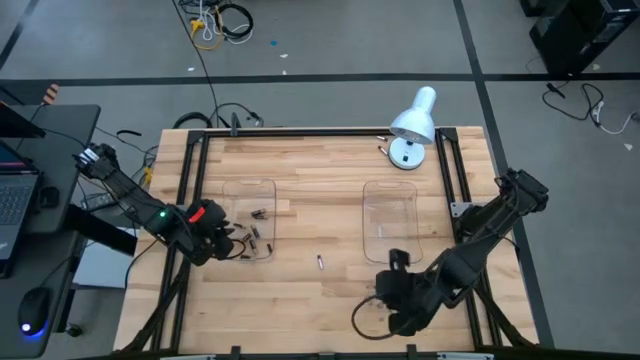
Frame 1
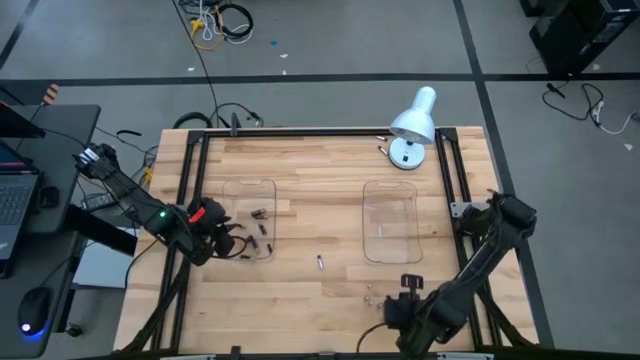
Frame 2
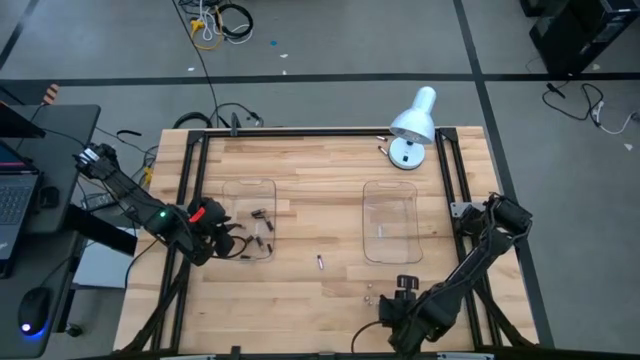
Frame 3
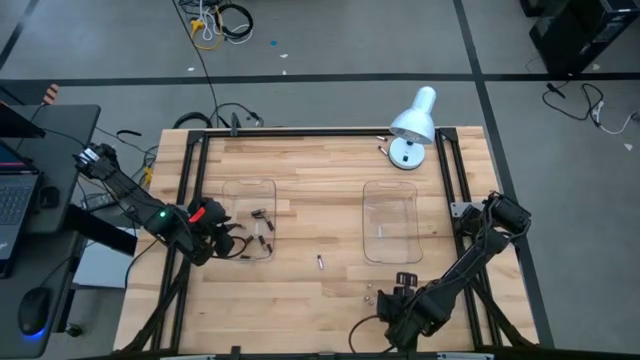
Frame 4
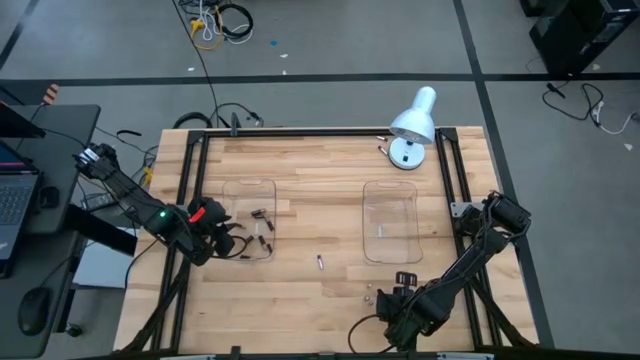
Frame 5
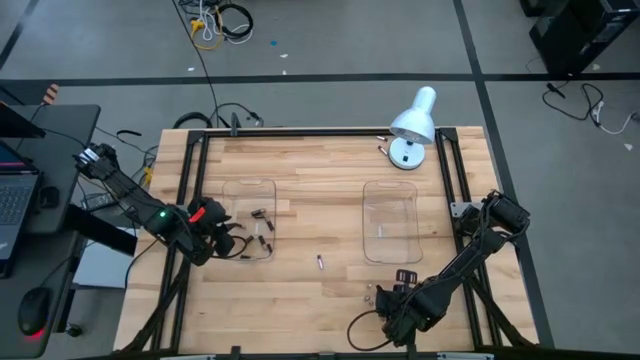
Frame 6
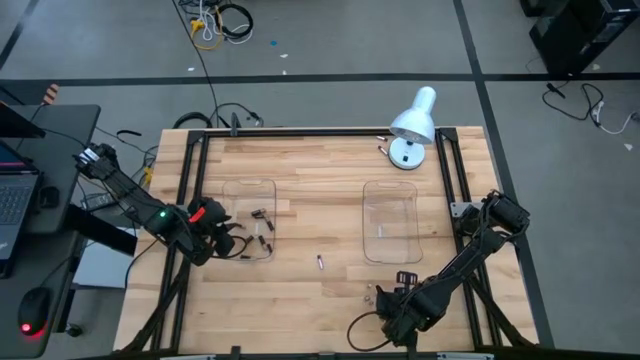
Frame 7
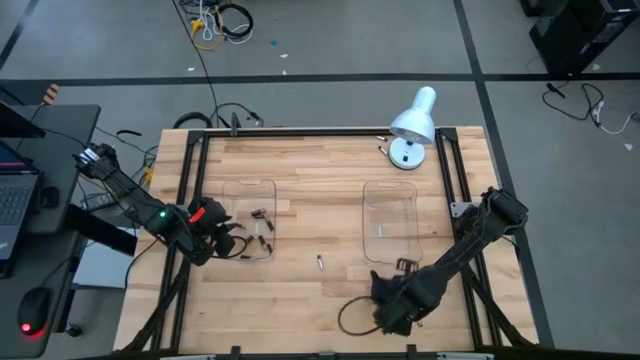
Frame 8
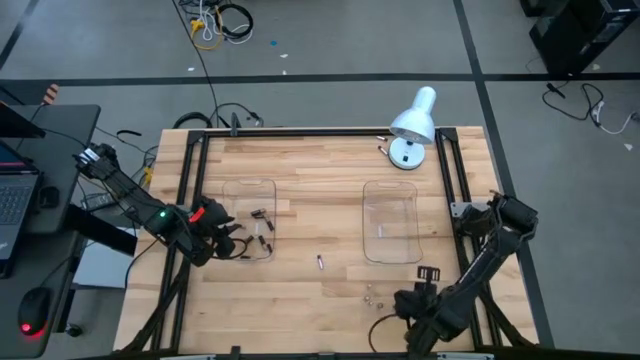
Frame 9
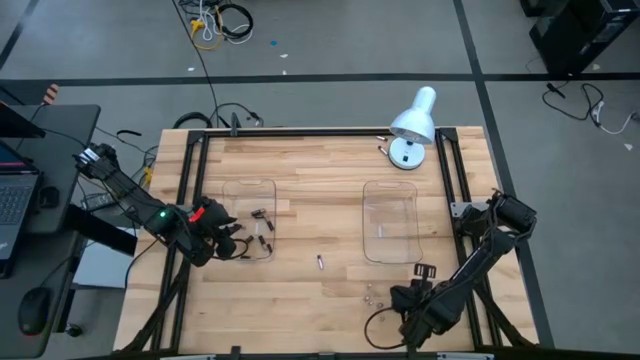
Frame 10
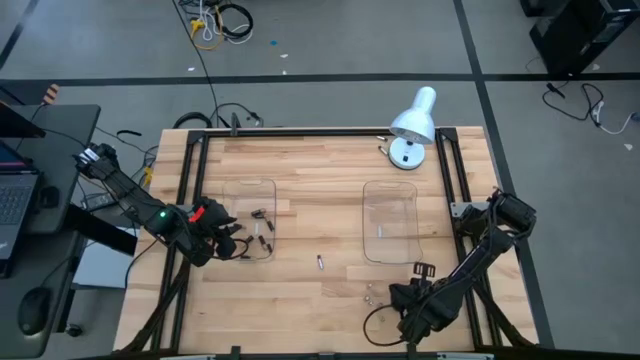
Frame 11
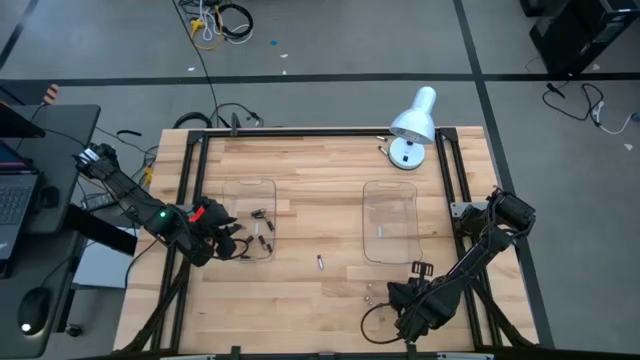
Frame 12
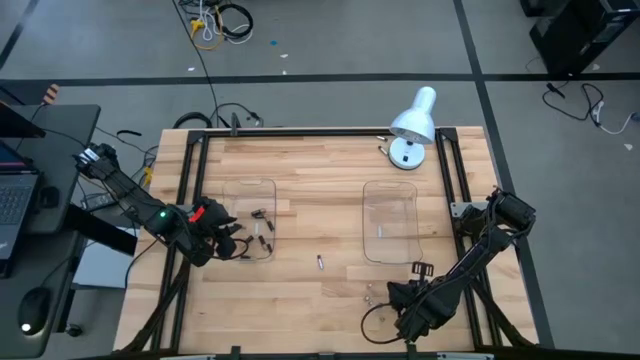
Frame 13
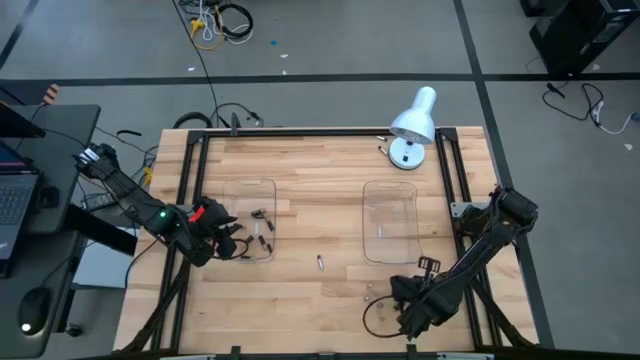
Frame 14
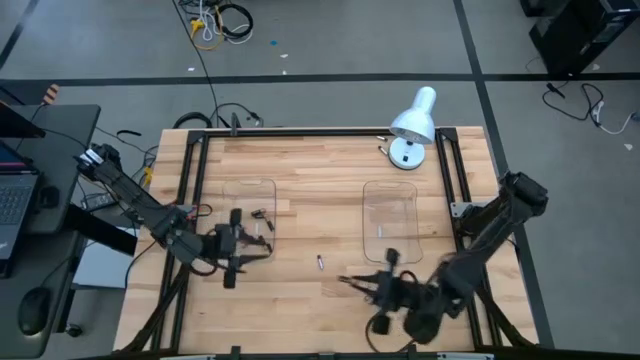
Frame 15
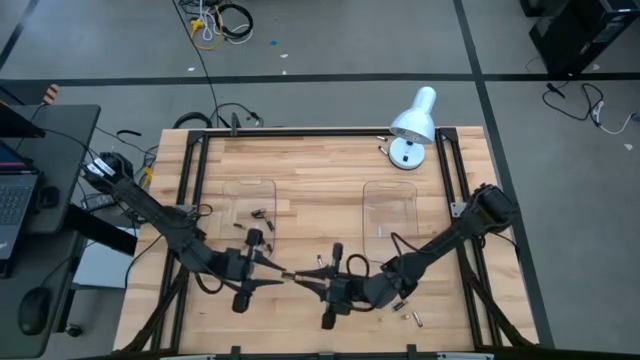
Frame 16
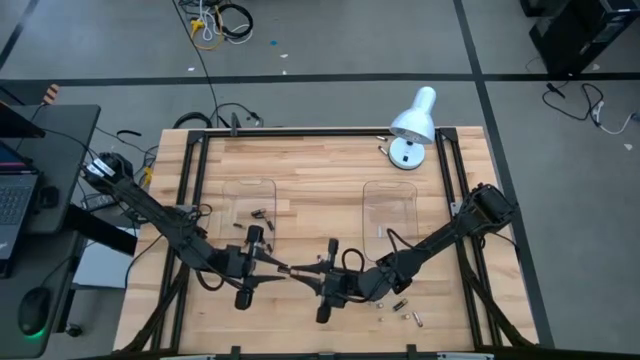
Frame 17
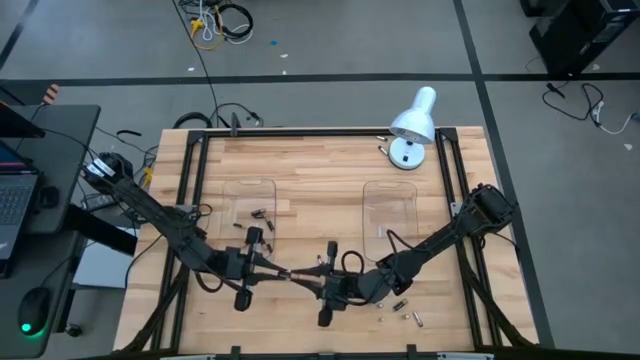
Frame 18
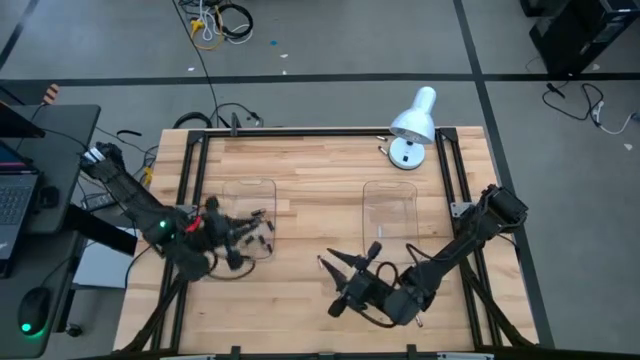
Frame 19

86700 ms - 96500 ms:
Task: Sort batteries
Put the black battery into the left transparent bin

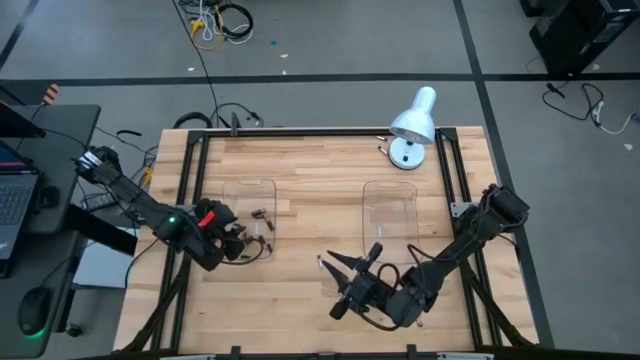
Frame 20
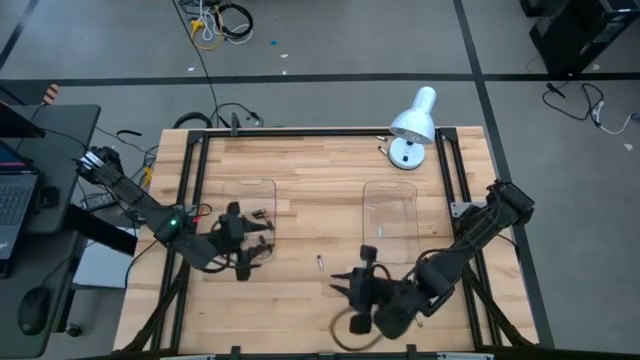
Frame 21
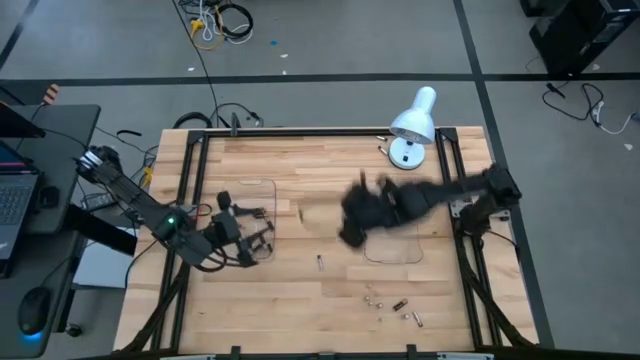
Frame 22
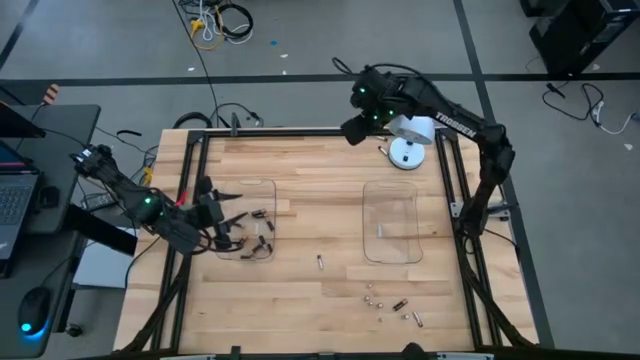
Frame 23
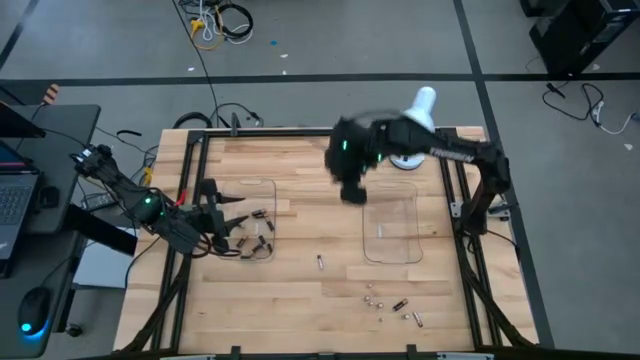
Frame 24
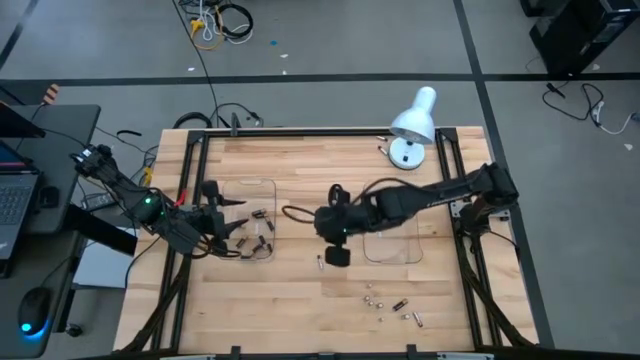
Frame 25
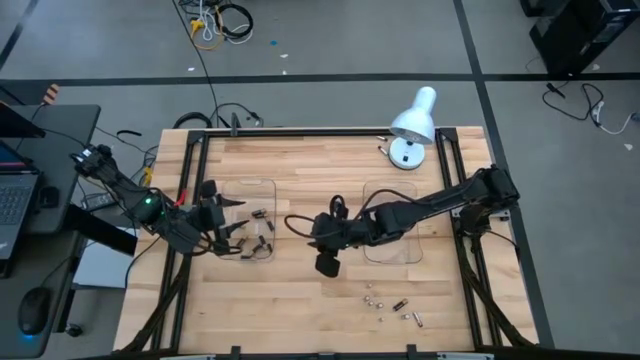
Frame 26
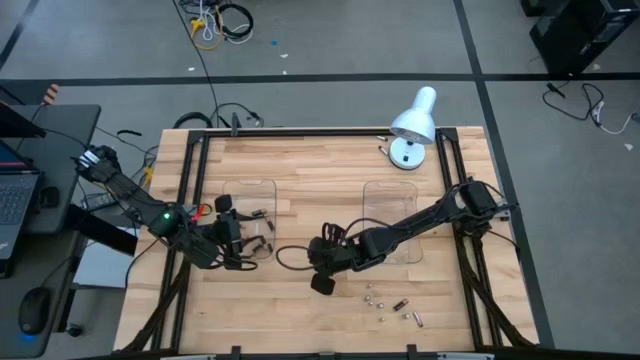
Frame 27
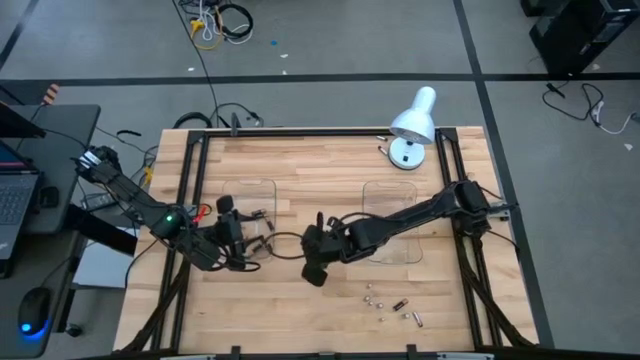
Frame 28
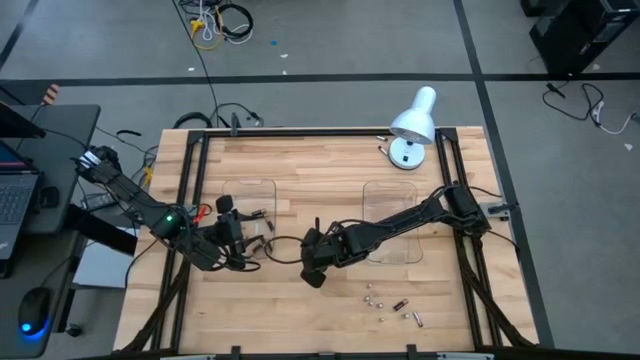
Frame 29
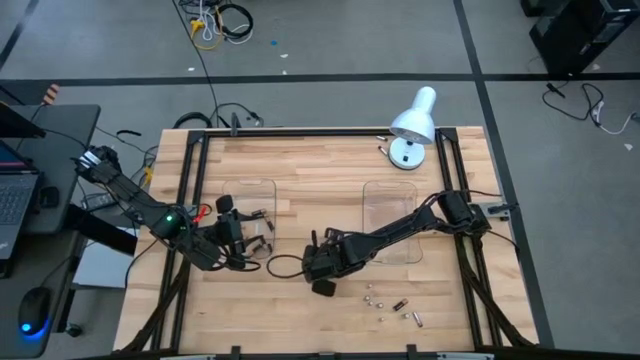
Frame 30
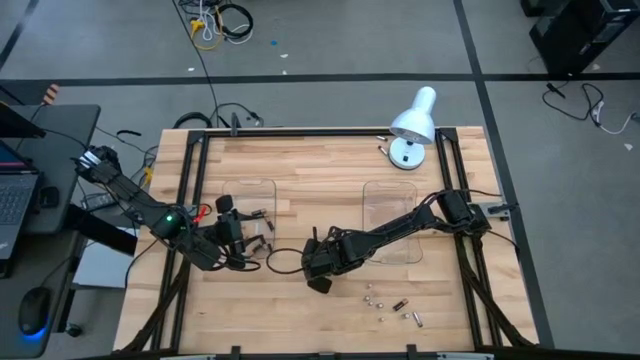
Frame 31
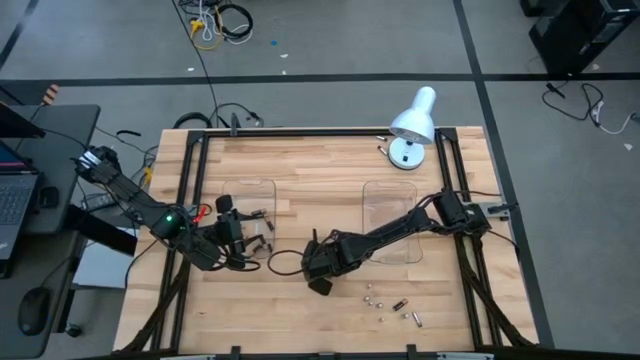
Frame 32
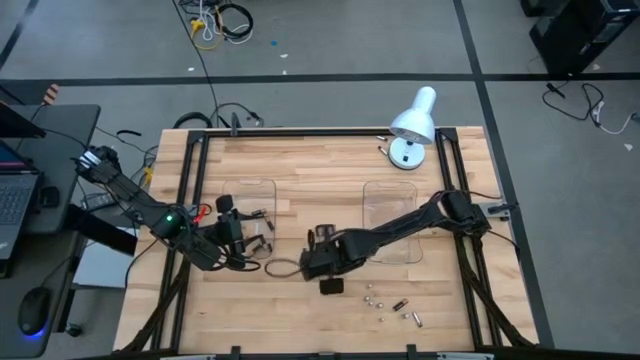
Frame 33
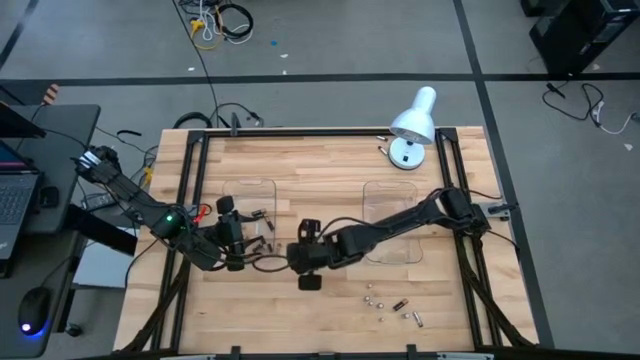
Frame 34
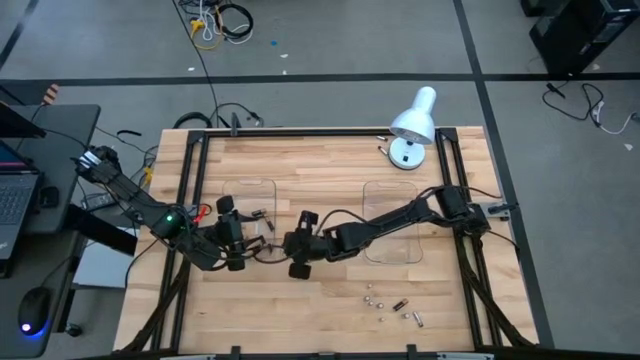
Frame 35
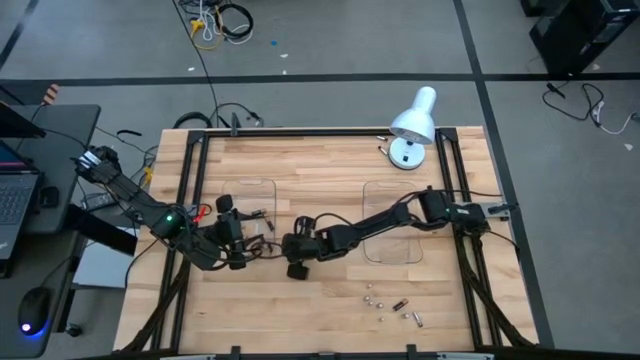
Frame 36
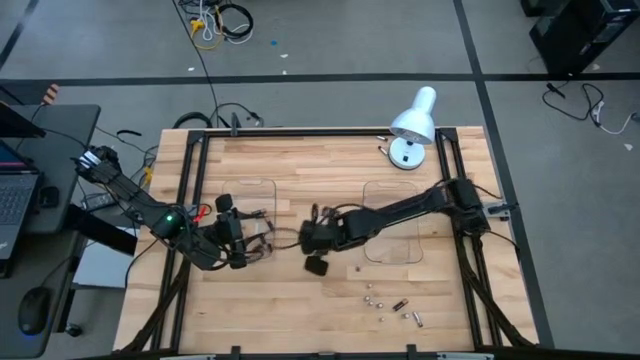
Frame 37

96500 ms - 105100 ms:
Put the silver battery into the right transparent bin

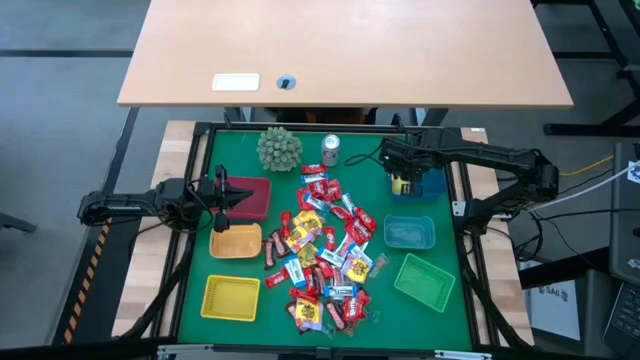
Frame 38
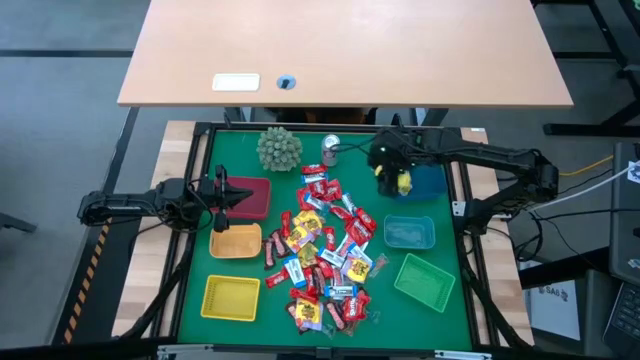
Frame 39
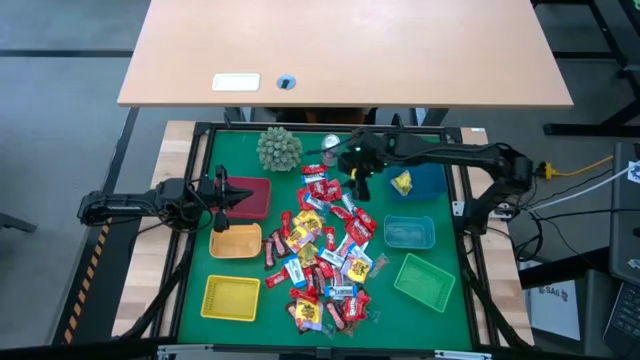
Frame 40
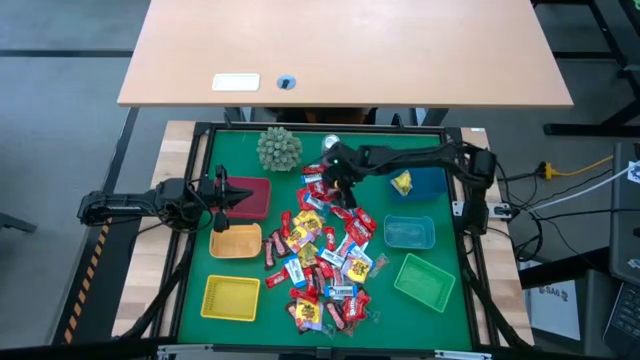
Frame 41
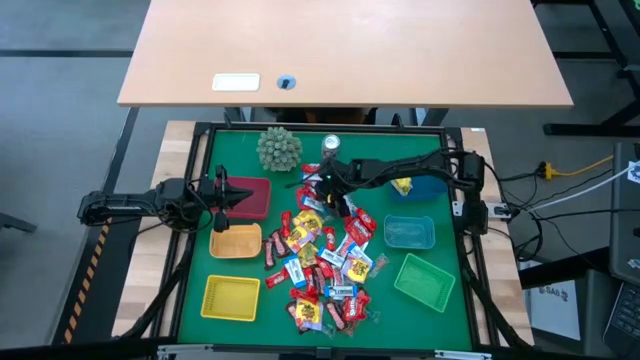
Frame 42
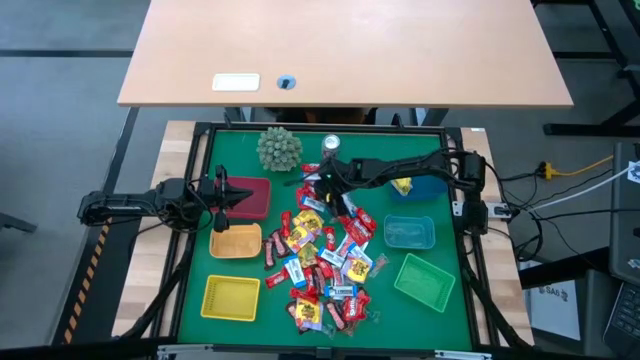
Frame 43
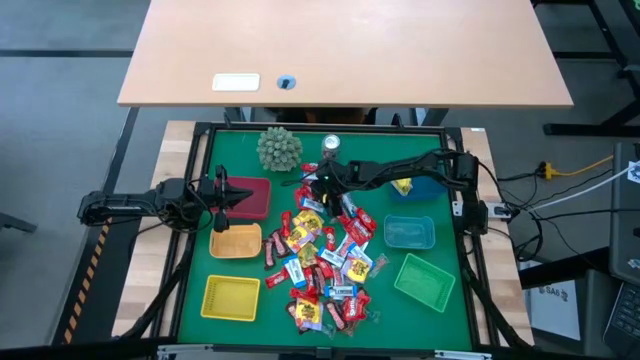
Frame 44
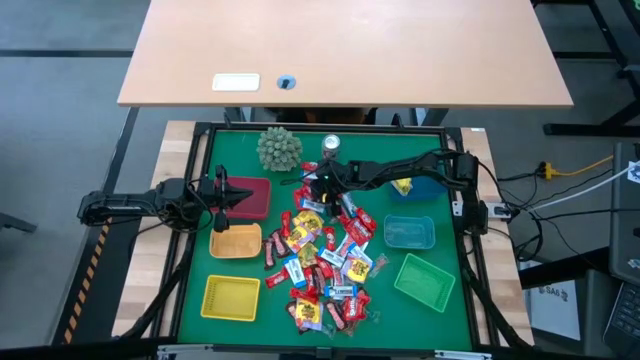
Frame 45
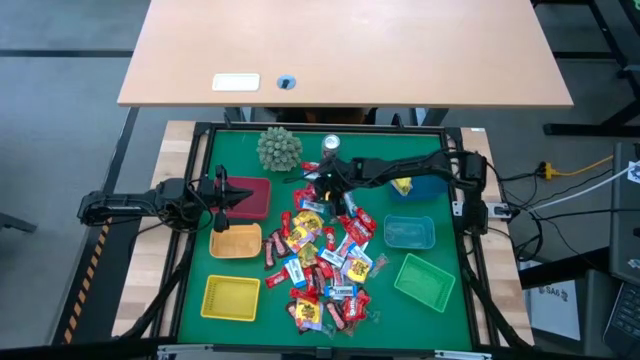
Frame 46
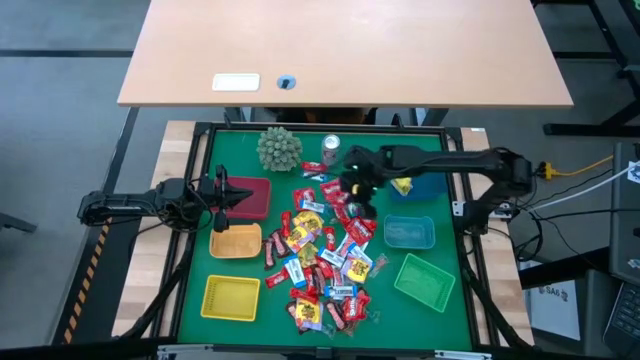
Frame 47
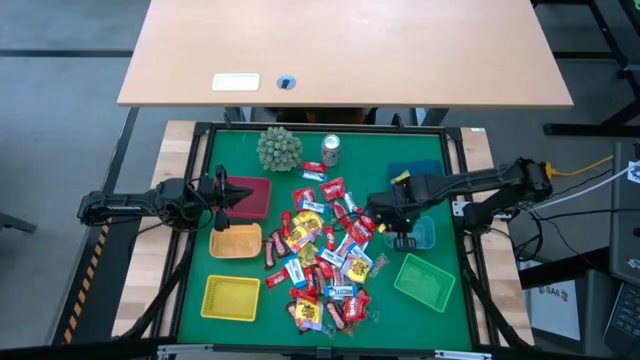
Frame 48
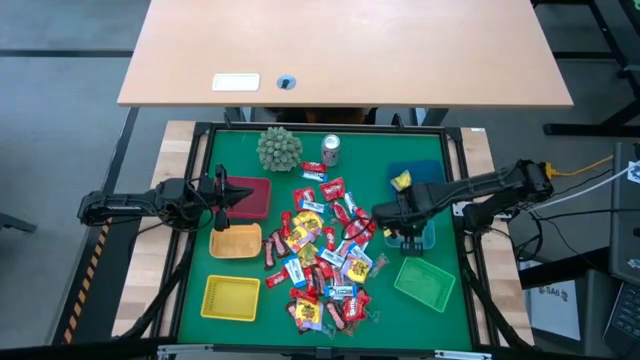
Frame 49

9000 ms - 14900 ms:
Task: Sort candy
Put the red candy into the light blue bin
